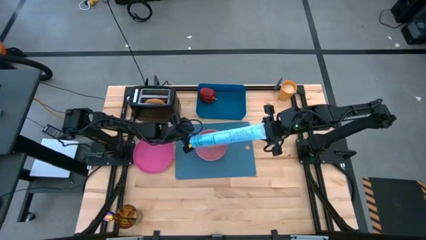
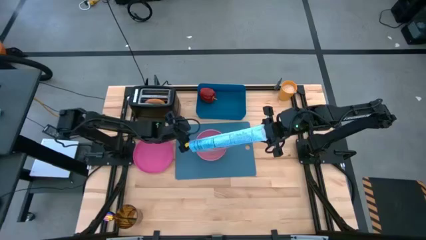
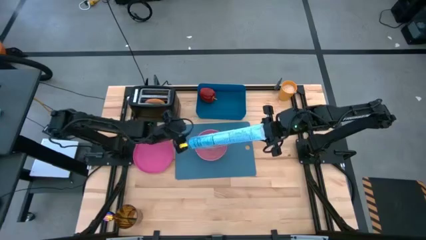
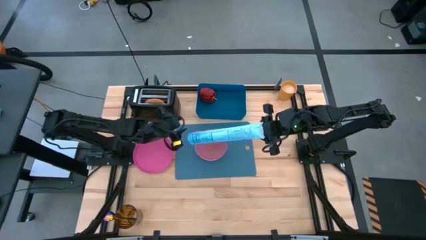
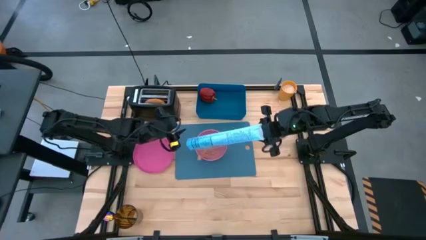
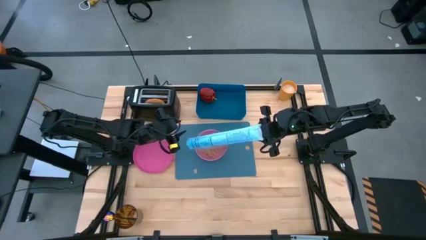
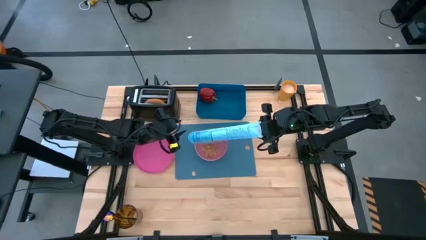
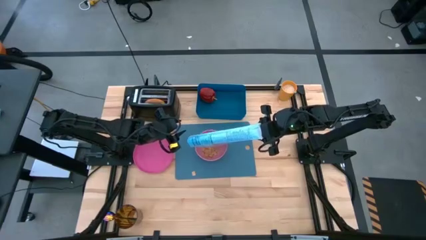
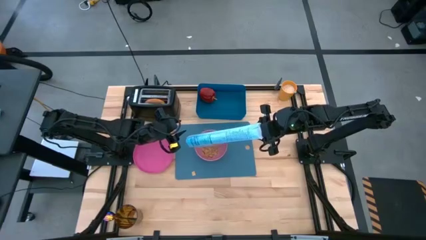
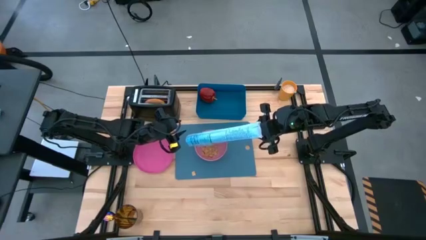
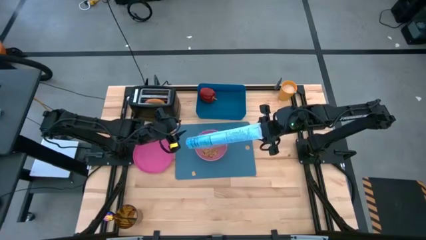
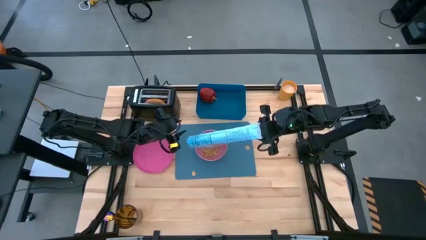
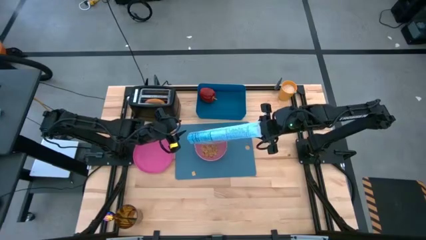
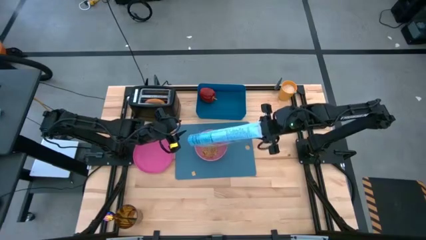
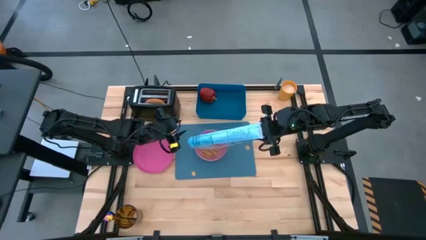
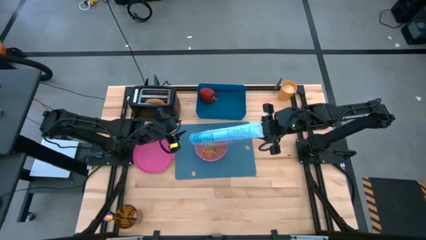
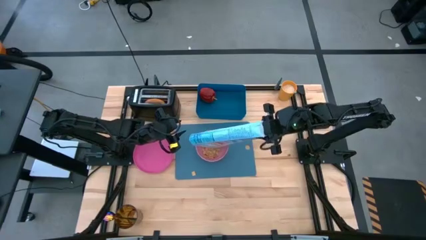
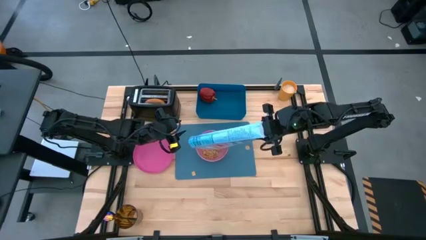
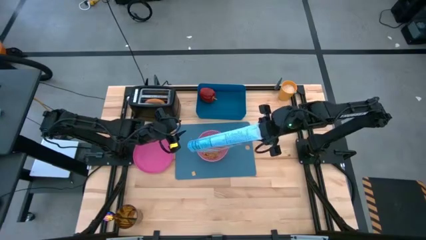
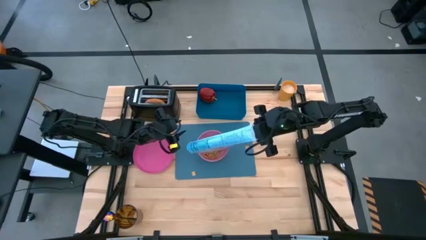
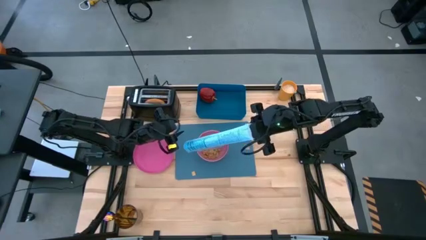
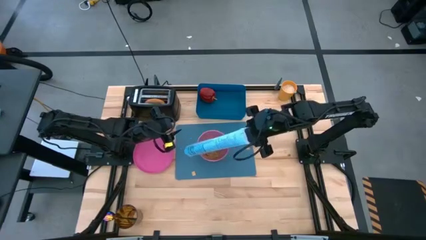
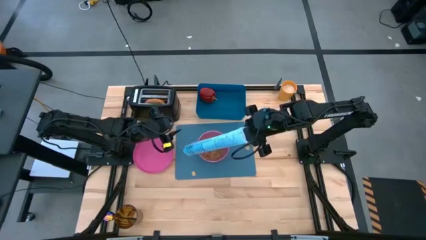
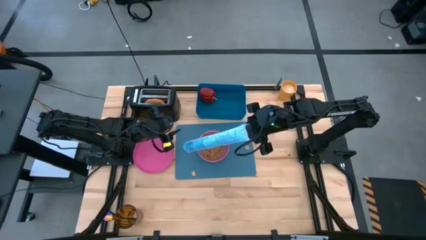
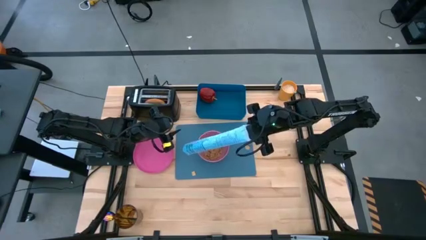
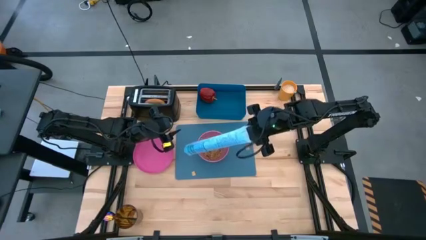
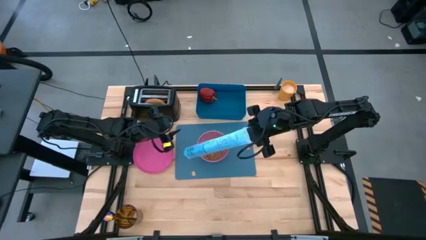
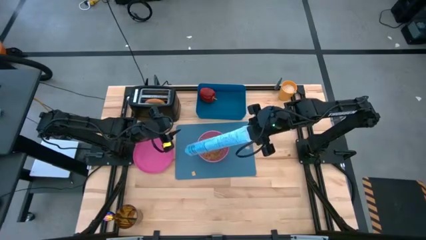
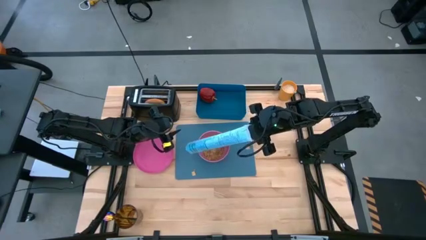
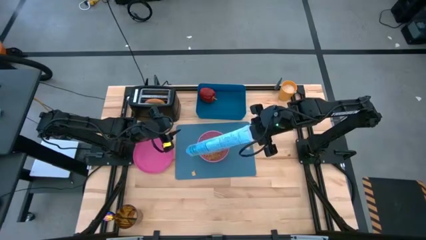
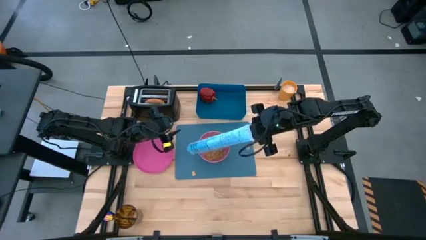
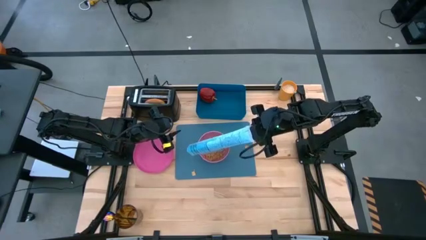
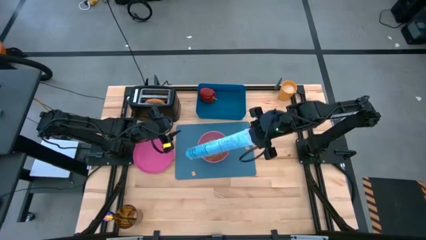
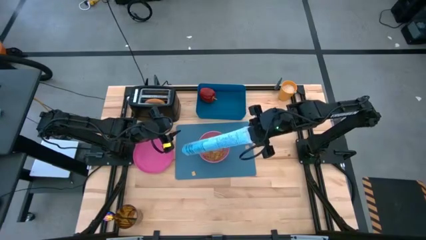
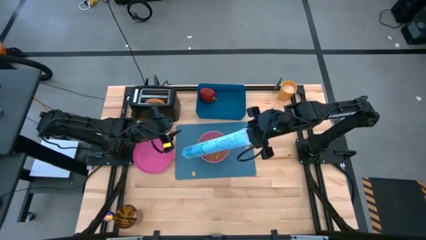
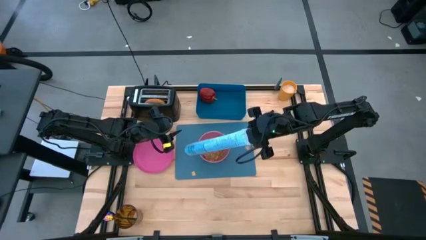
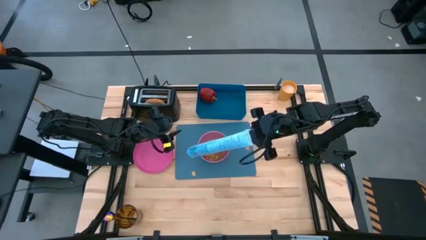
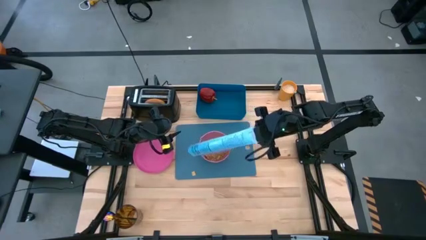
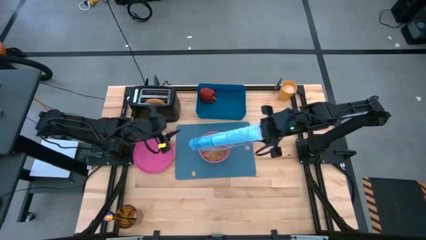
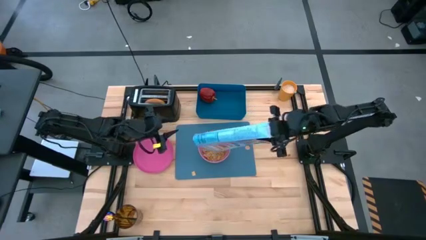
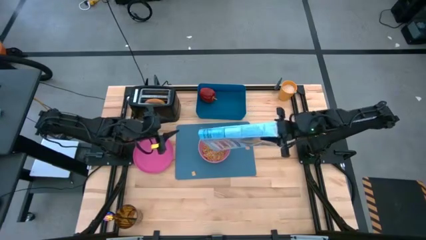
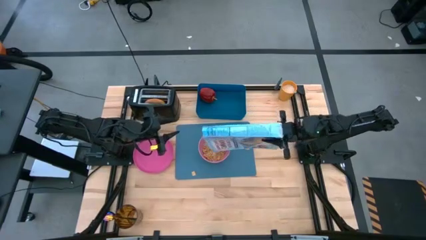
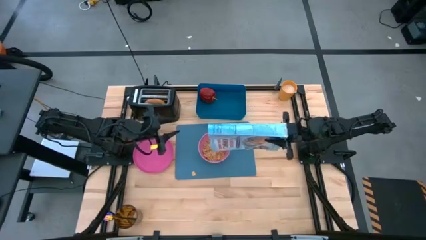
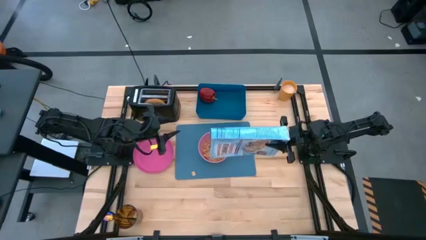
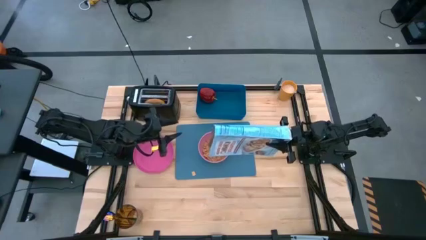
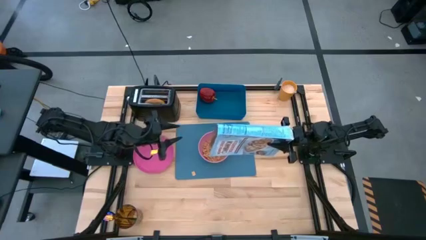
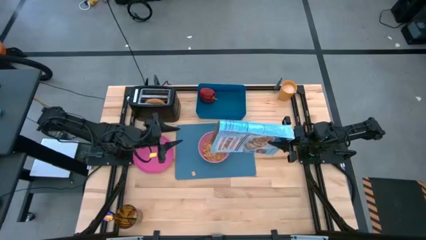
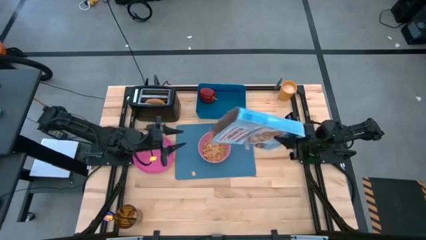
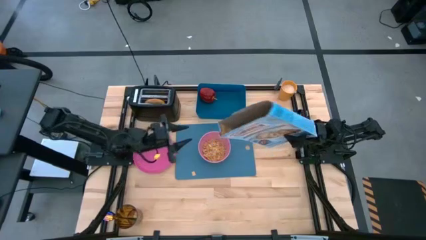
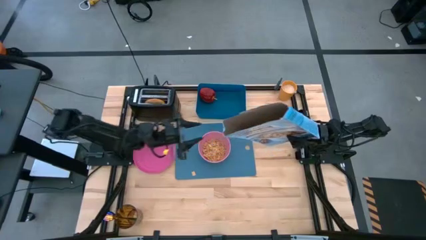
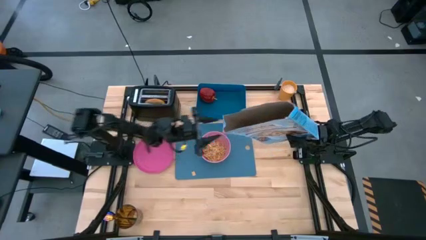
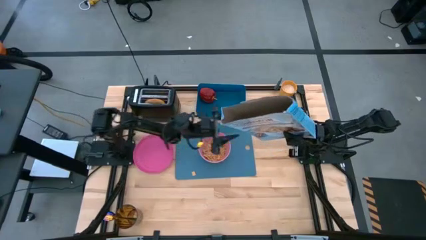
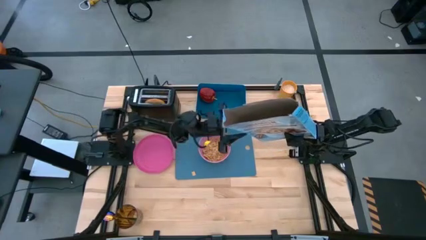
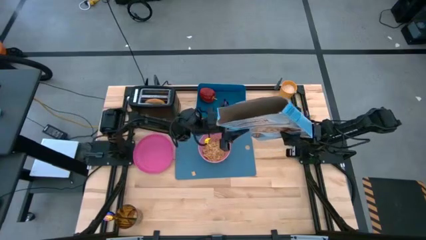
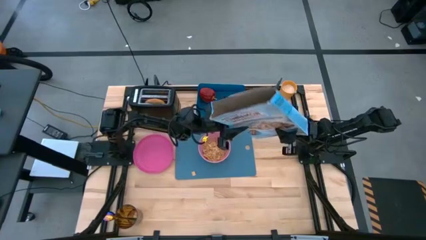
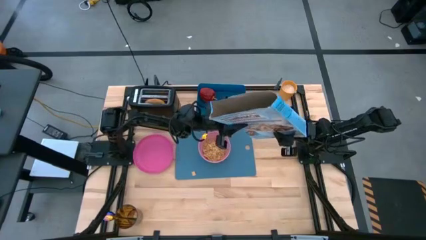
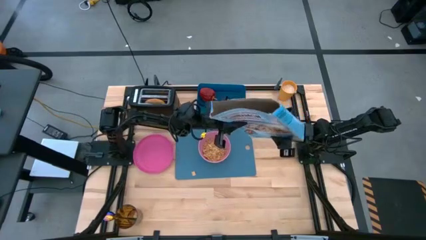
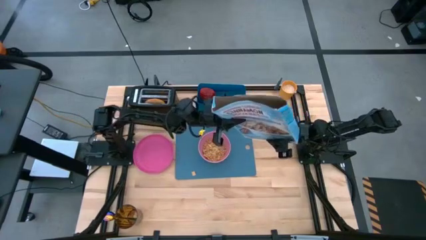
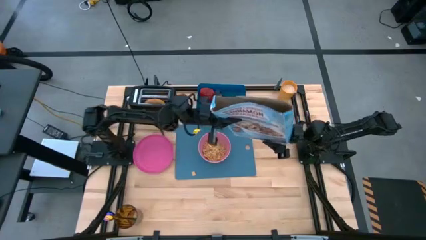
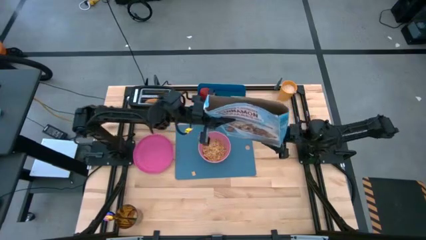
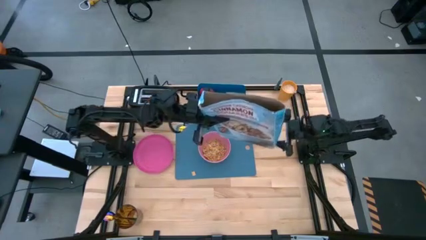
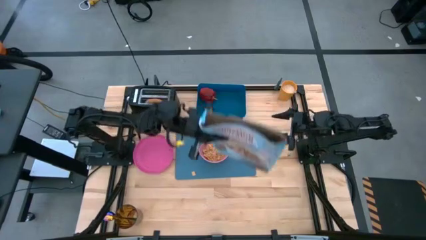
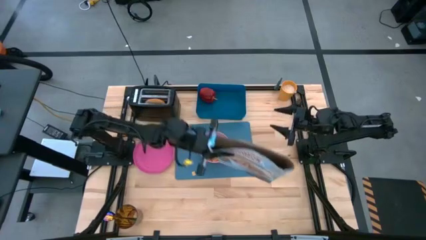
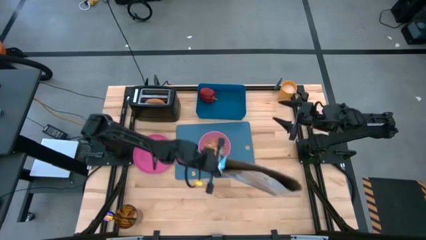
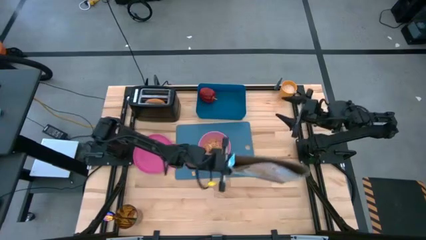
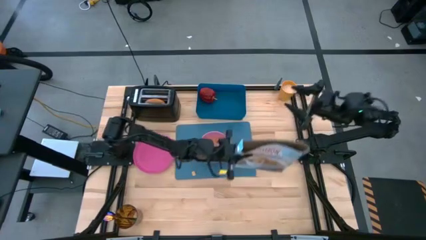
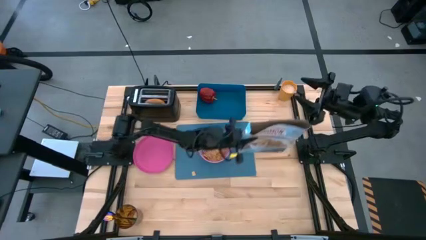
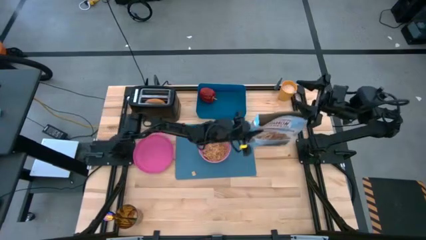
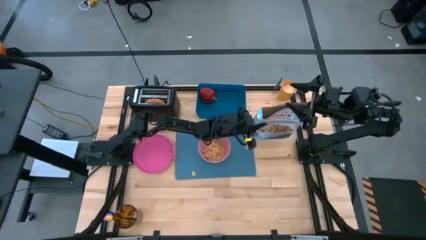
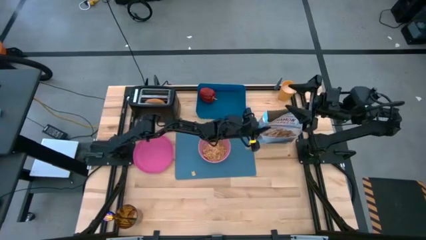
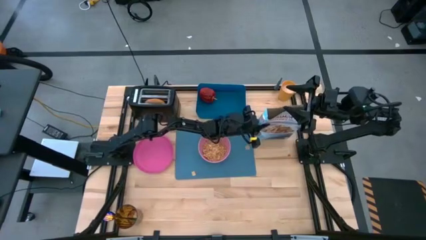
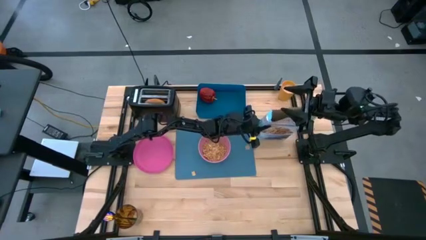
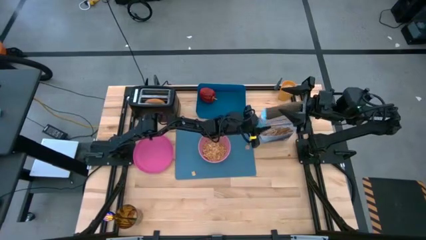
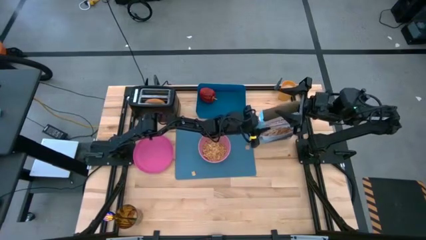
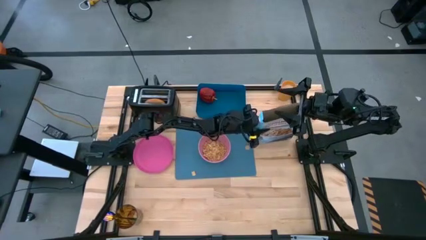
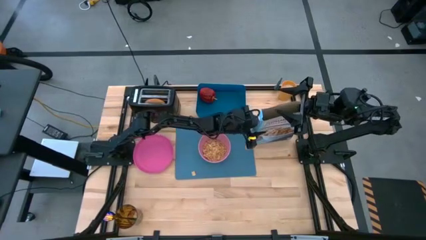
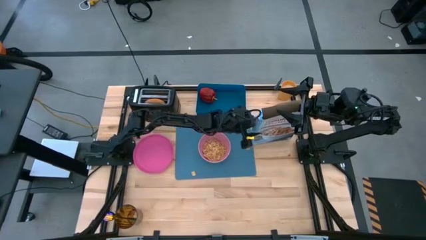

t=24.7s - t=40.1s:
Task: Arrange a breakfast setting
Pour the cereal from the cereal box into the pink bowl
